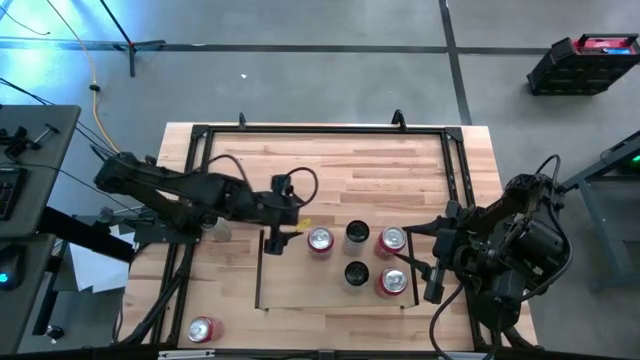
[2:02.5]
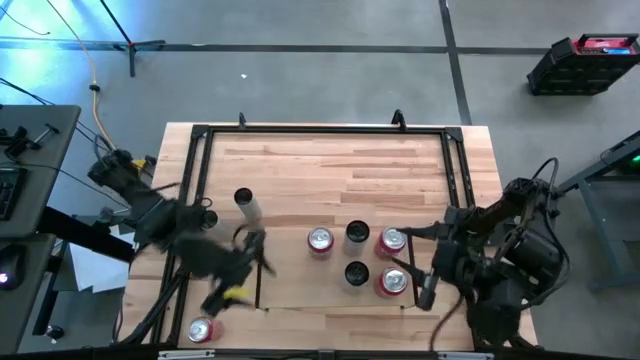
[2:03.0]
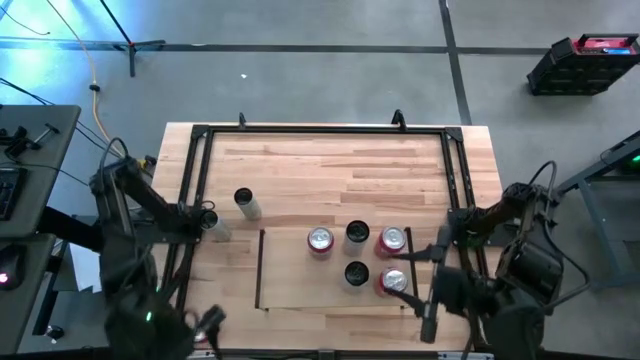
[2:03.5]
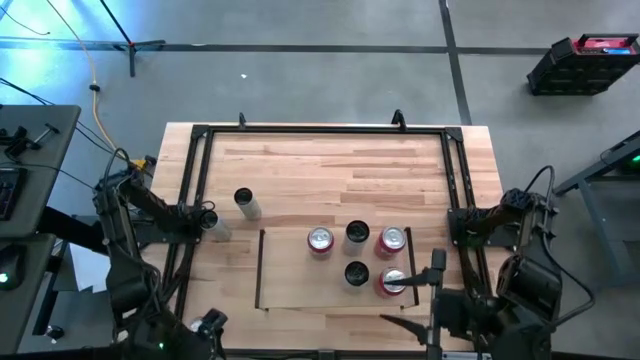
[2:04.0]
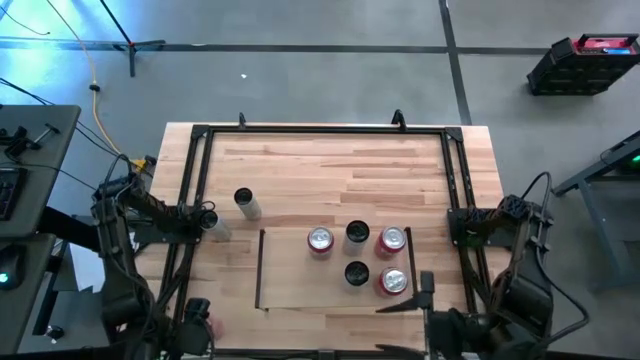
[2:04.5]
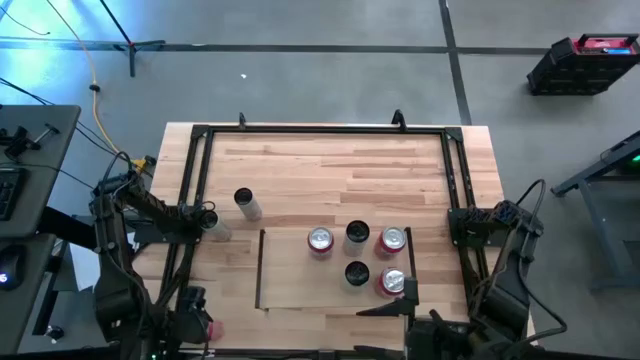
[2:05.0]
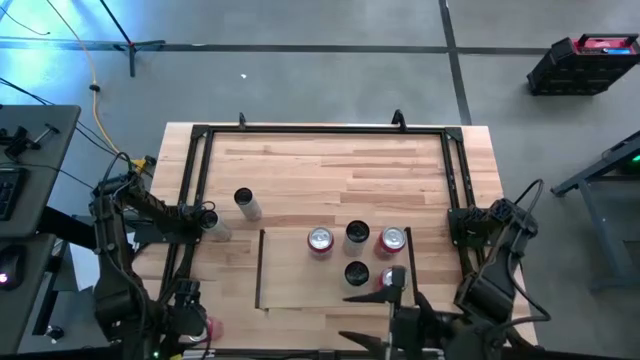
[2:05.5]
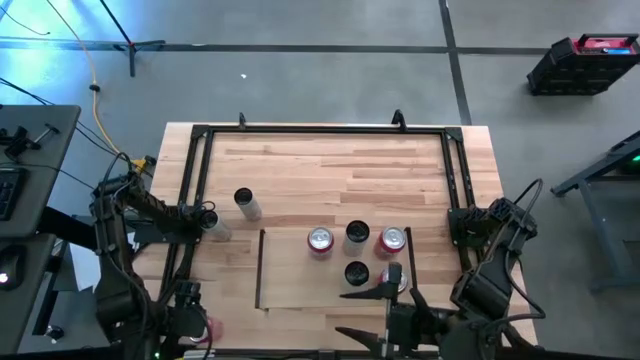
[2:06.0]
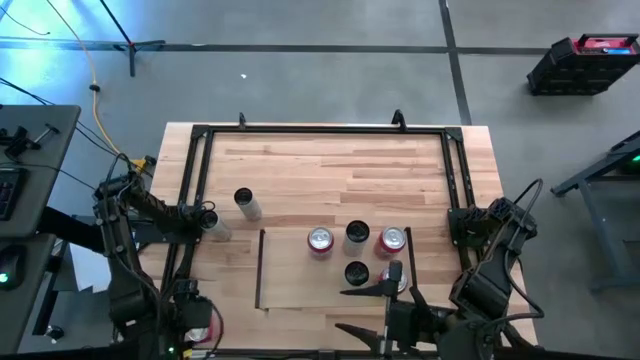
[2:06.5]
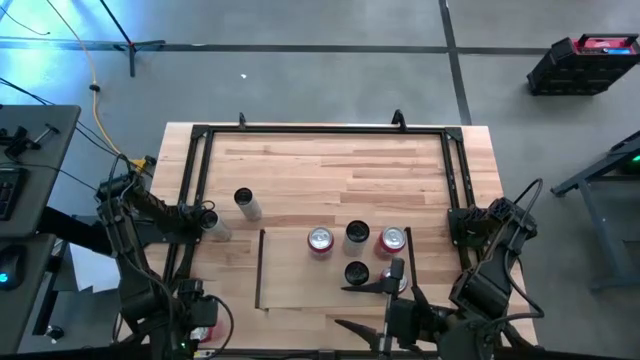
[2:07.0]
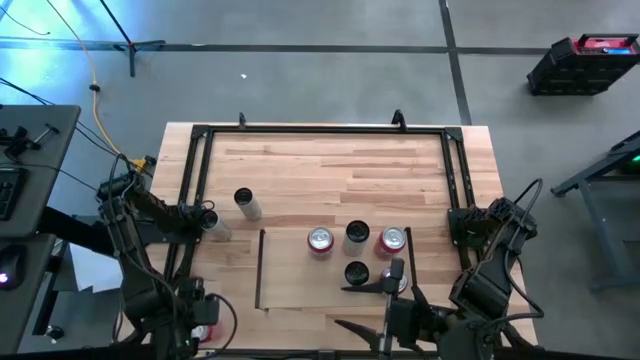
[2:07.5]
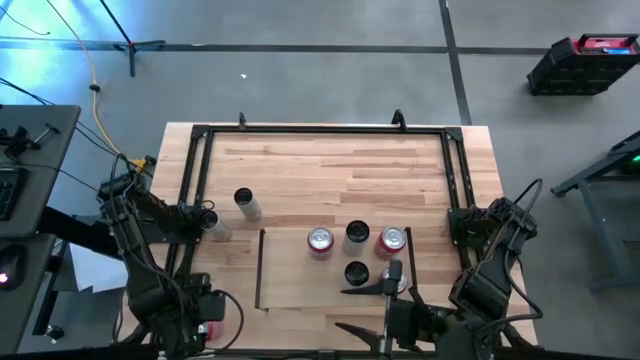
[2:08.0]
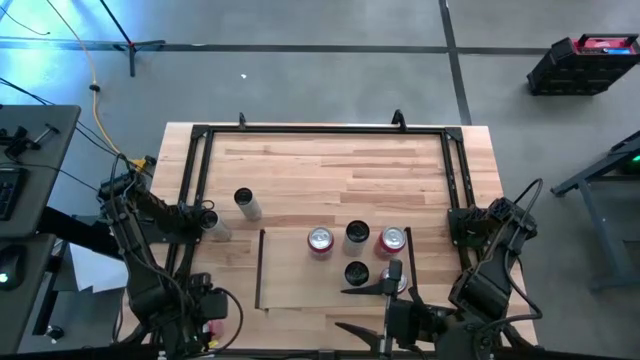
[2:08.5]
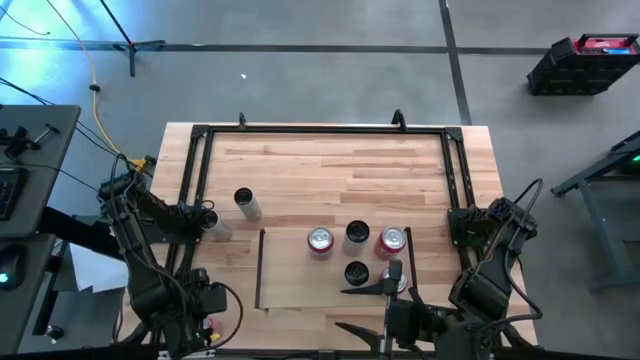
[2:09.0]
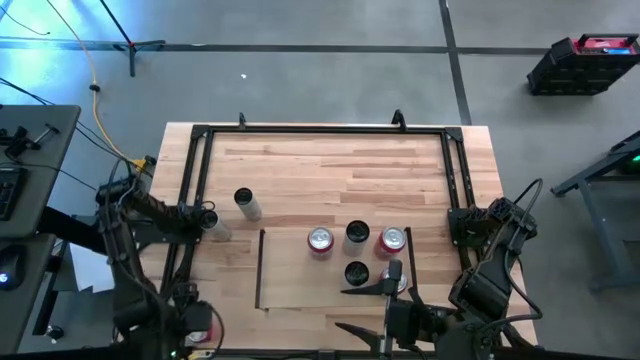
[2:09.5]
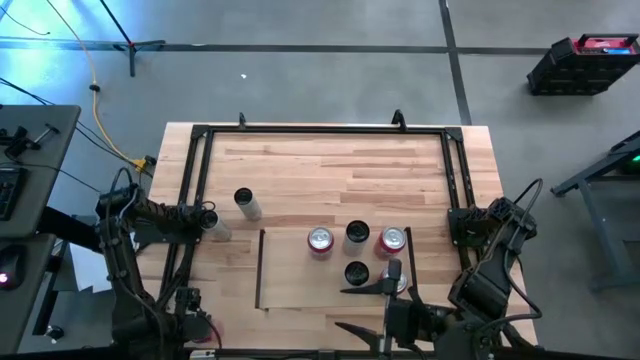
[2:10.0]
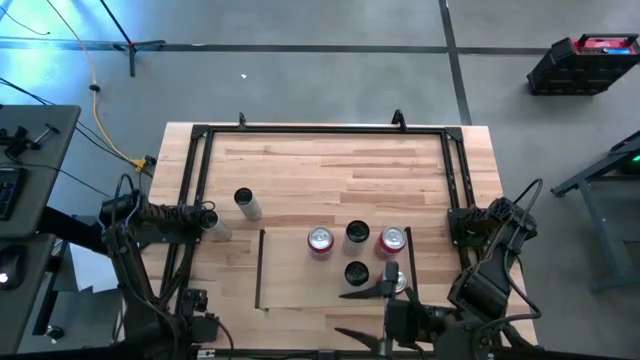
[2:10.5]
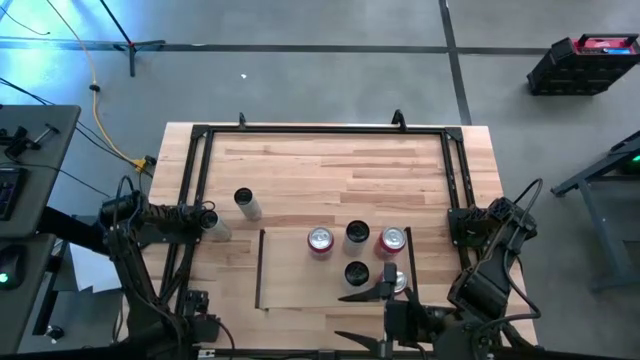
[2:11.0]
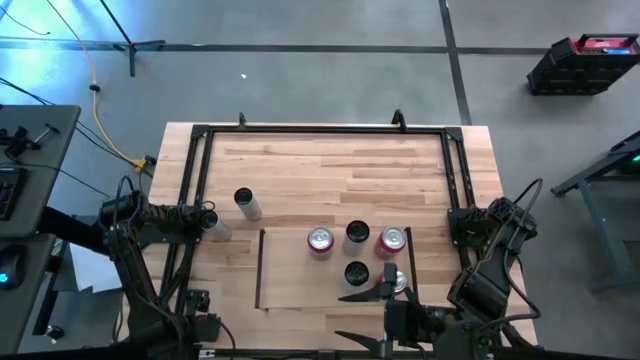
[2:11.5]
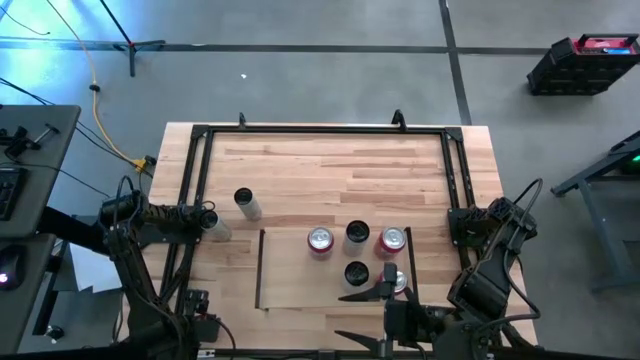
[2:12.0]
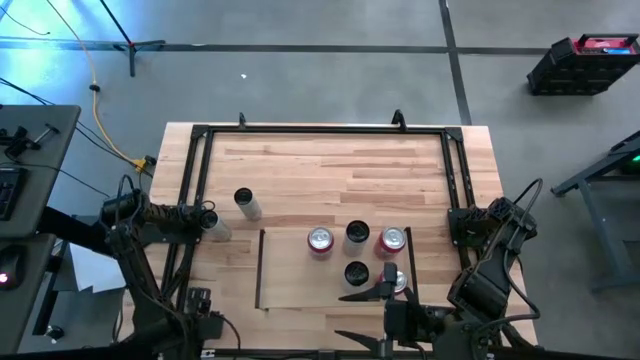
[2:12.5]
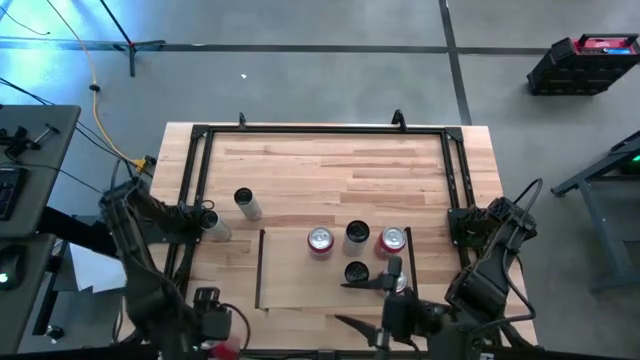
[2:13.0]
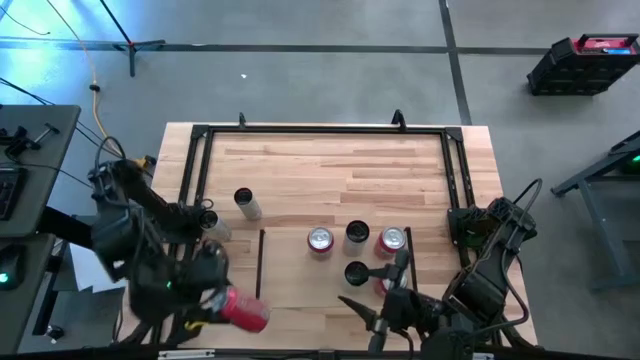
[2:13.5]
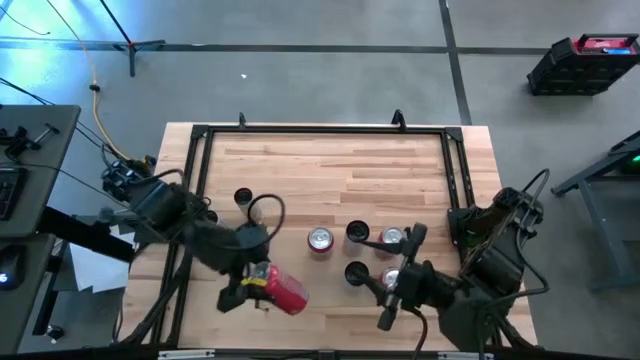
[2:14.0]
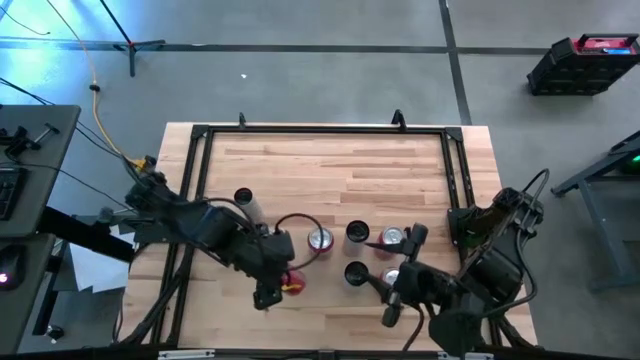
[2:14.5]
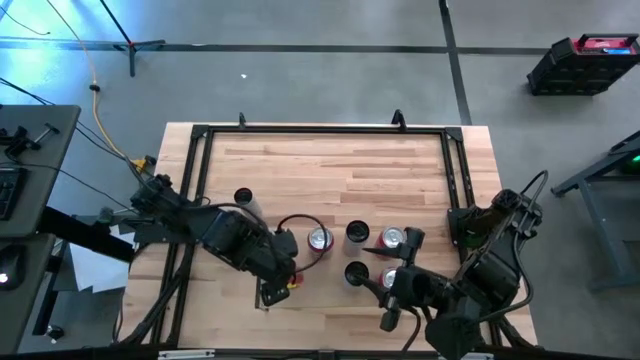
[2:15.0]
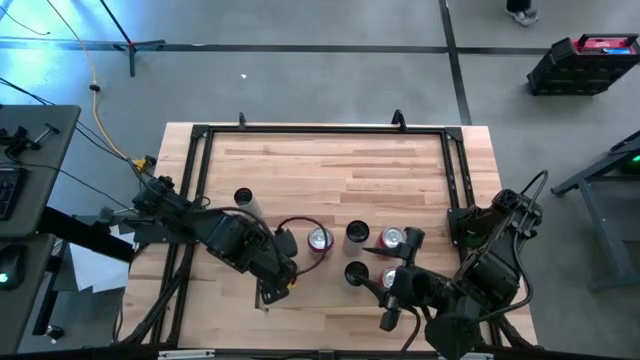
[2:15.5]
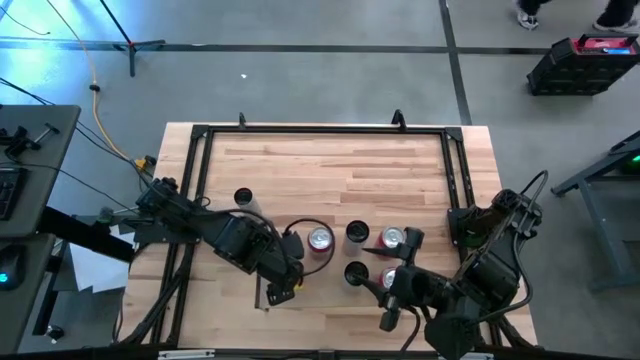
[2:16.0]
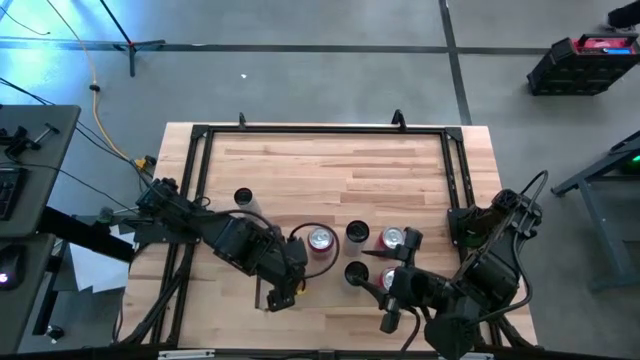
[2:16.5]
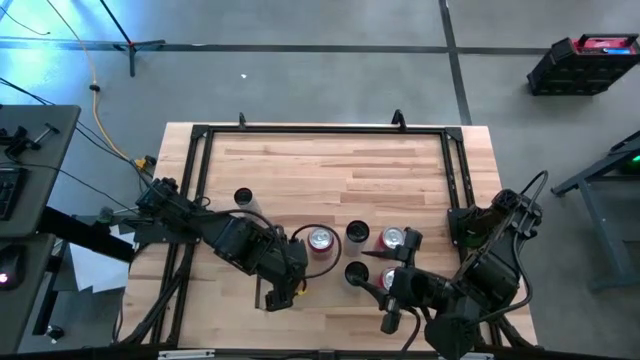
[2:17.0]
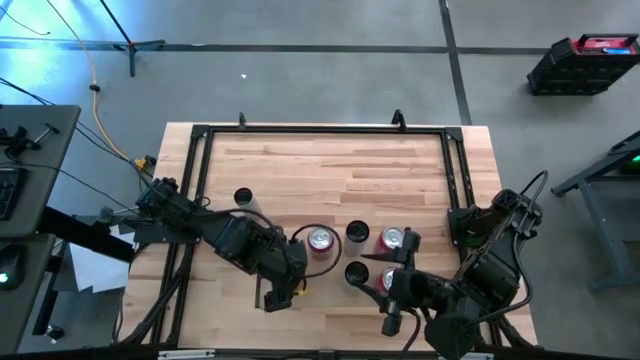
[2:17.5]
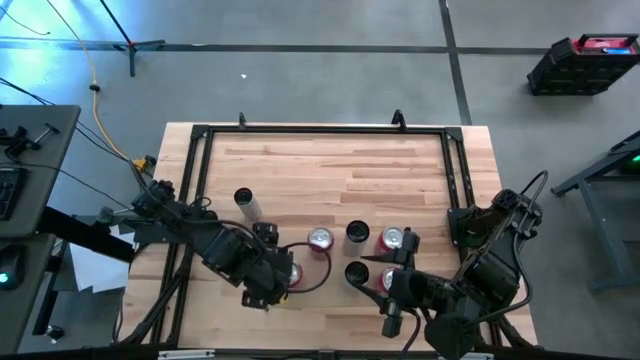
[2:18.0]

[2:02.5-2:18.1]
Task: Place canned beverage on shelf
Put the red soda can on the shelf
